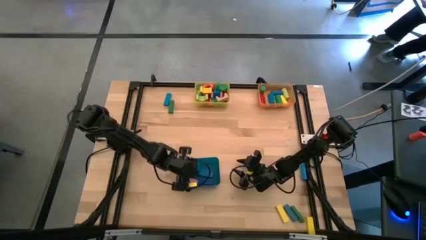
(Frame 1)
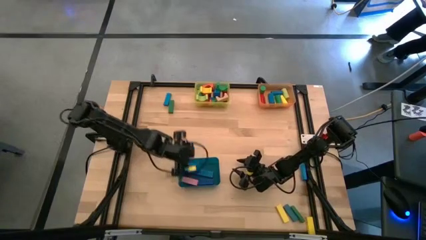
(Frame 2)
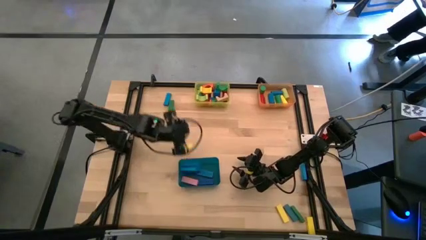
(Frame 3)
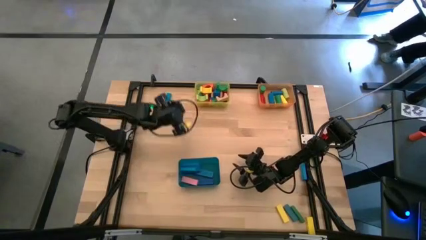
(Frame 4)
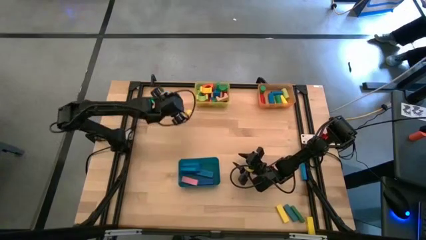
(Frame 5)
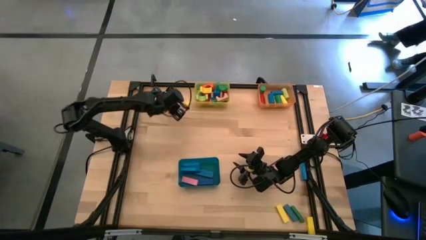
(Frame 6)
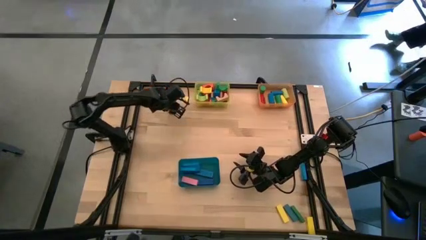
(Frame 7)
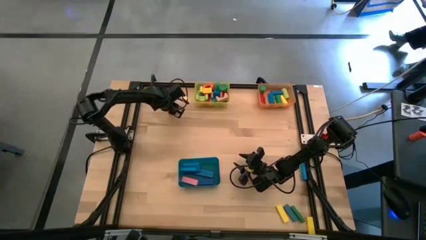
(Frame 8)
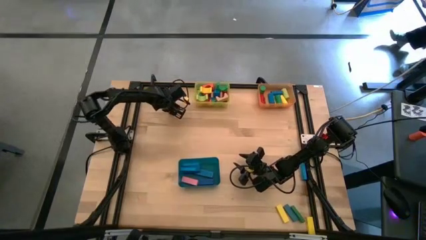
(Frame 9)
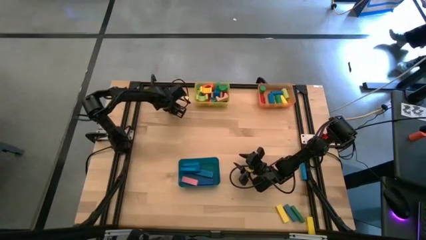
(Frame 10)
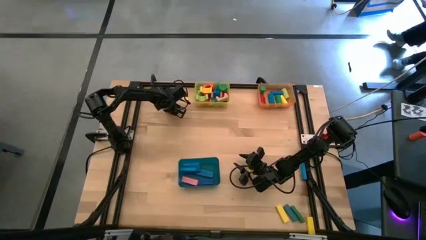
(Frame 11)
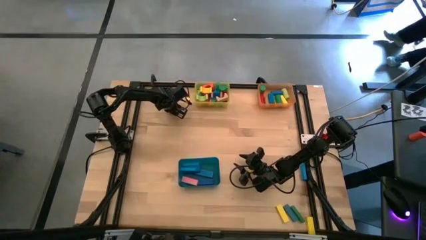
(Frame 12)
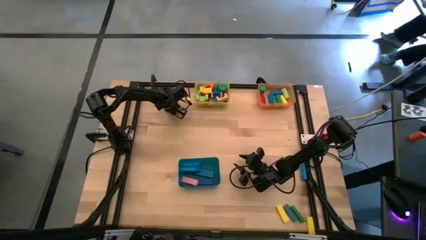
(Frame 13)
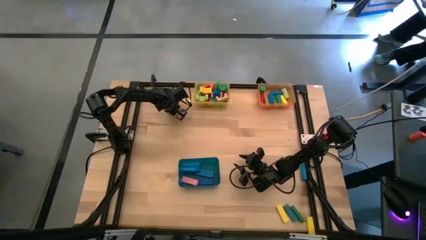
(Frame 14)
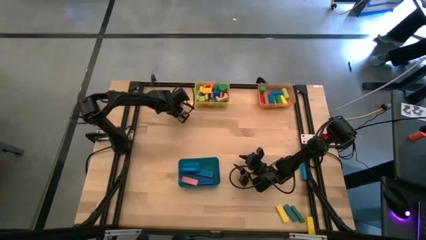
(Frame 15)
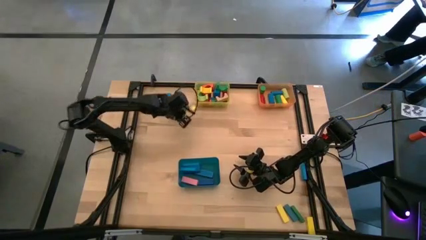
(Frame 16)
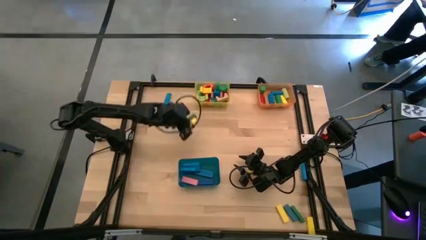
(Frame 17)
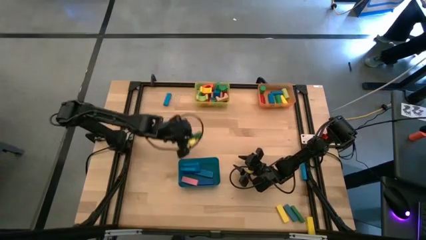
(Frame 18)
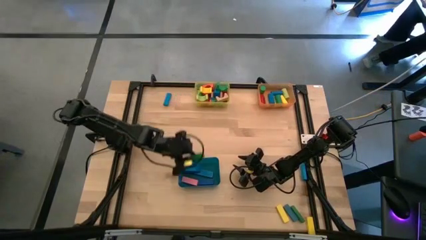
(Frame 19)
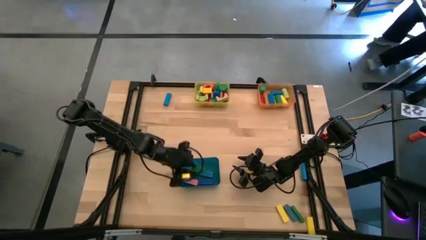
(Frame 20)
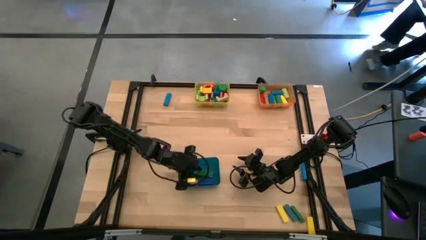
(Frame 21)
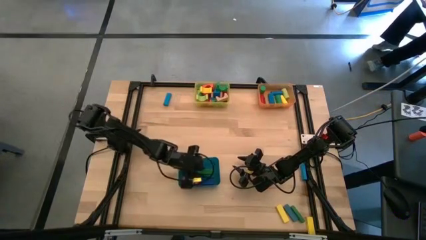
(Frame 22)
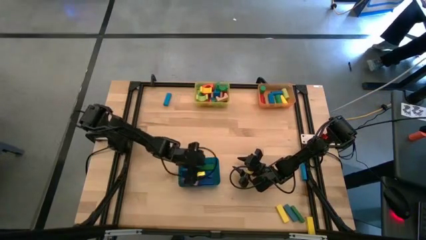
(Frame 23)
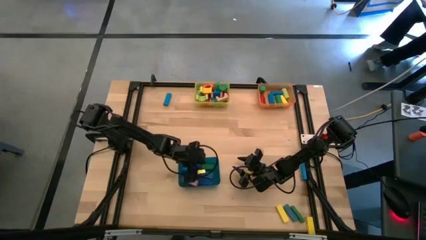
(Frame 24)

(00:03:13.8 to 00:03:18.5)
Task: Sort blocks by size
Put the green rectangular block into the blue bin

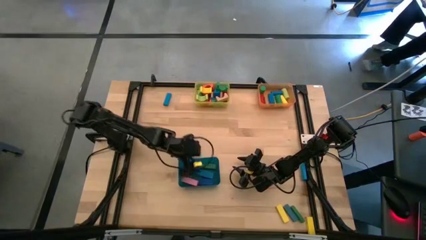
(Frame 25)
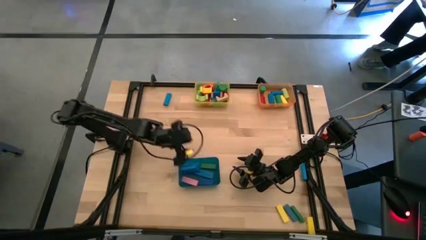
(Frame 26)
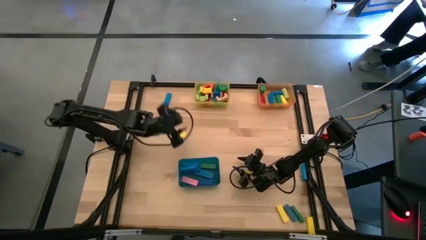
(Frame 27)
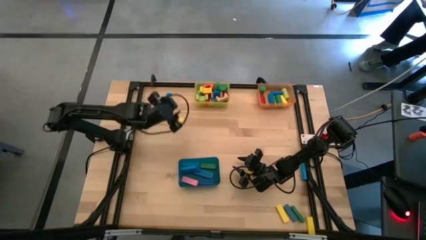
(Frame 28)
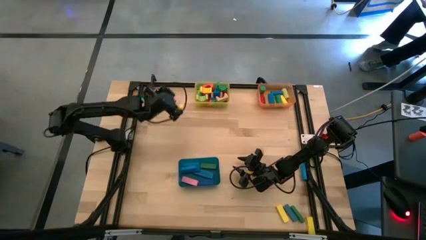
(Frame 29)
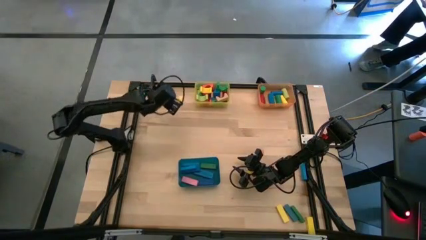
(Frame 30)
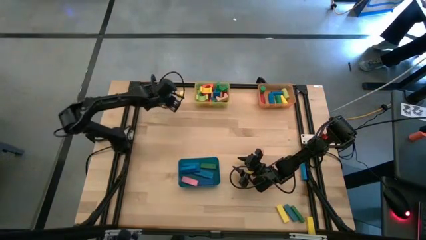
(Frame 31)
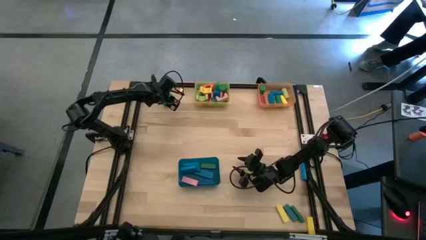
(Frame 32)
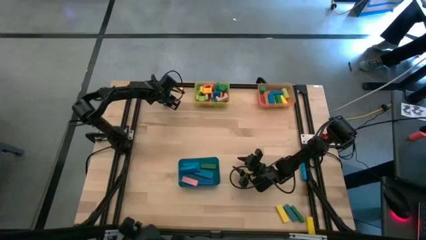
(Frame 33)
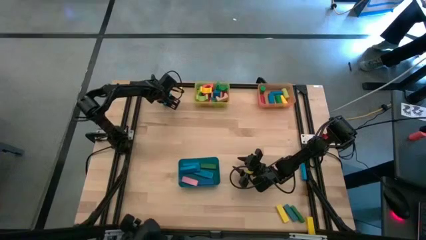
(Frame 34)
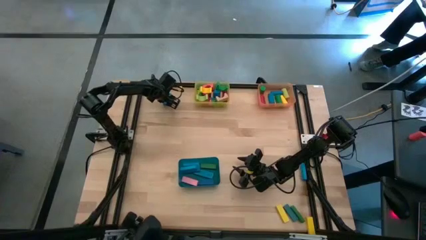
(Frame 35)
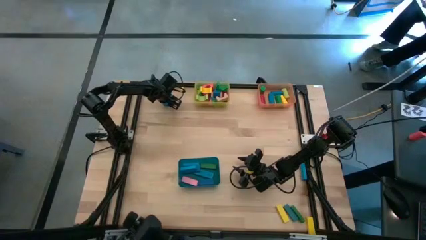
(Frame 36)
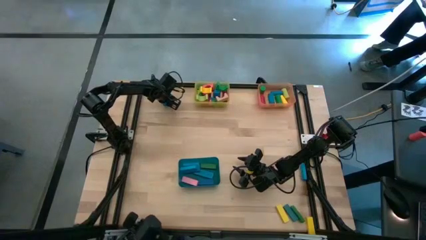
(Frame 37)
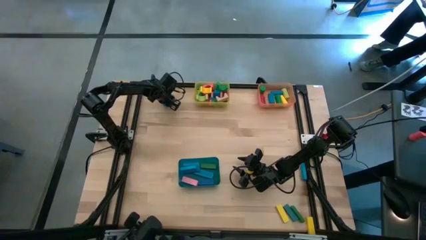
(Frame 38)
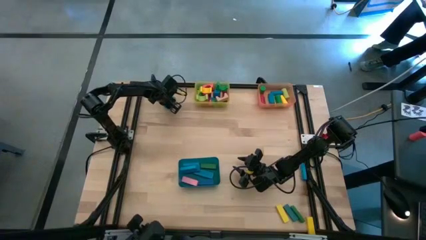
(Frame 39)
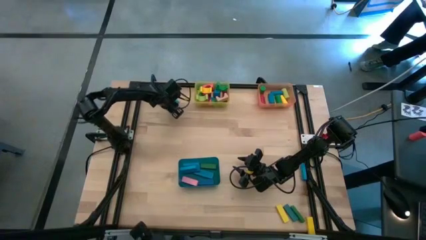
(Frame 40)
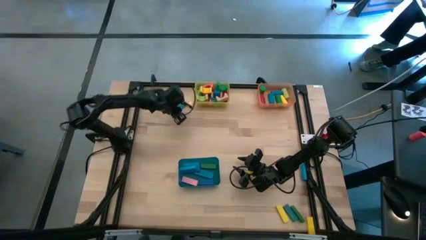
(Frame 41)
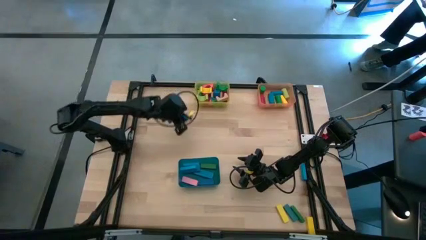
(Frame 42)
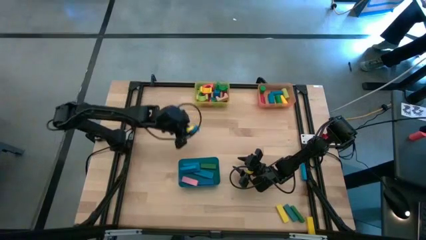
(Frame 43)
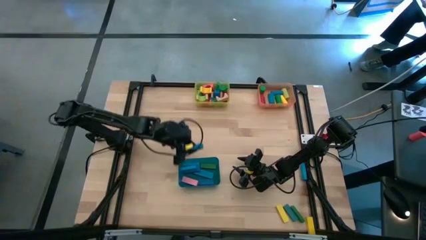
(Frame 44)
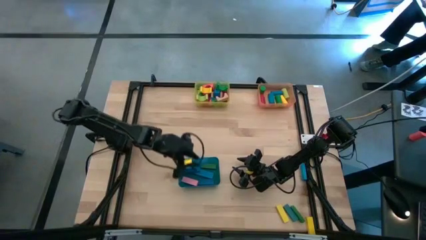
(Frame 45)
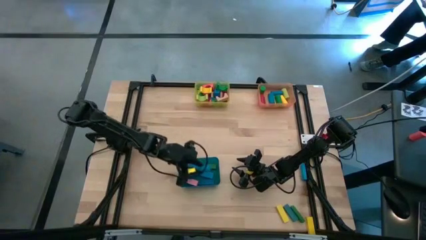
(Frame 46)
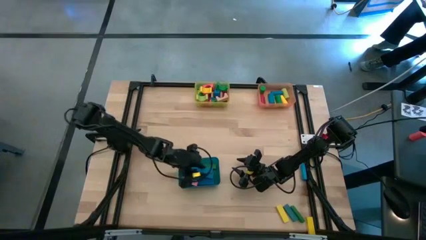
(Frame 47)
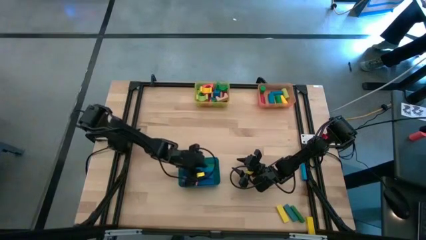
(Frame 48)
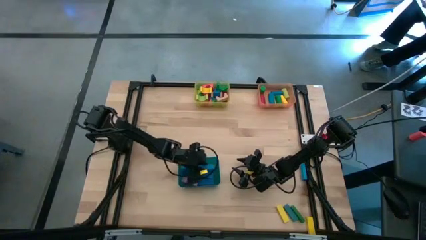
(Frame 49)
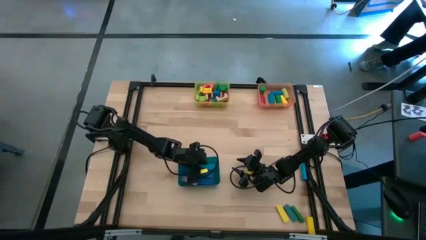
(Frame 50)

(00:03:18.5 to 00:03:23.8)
Put the blue rectangular block into the blue bin

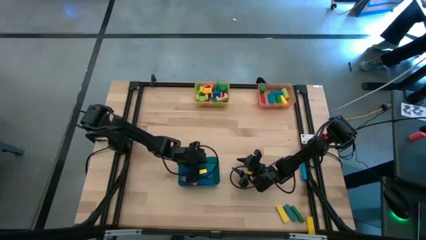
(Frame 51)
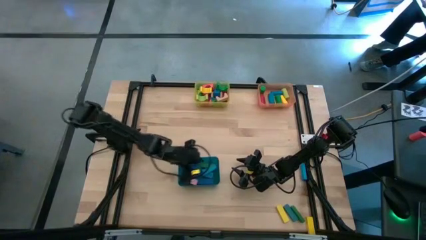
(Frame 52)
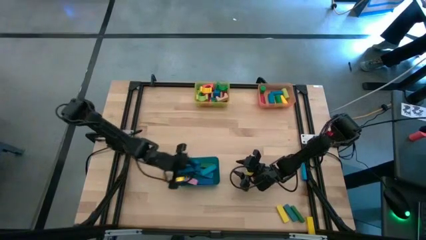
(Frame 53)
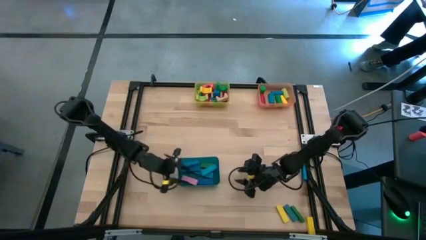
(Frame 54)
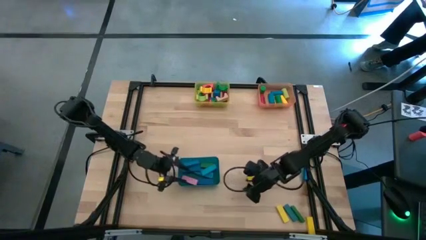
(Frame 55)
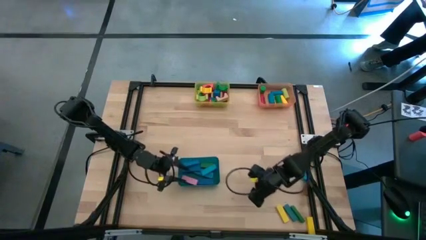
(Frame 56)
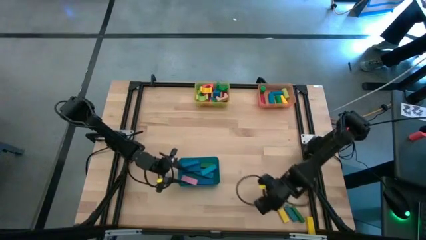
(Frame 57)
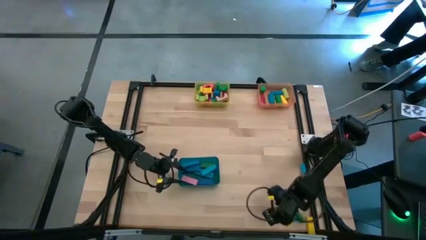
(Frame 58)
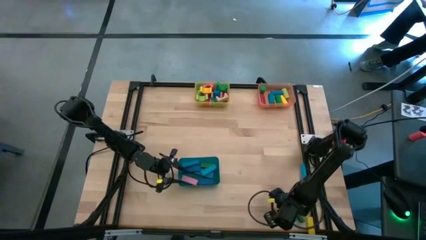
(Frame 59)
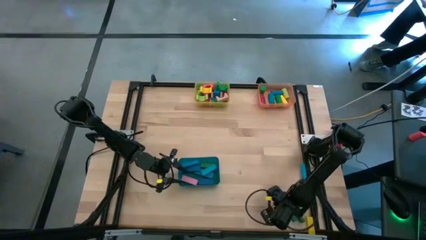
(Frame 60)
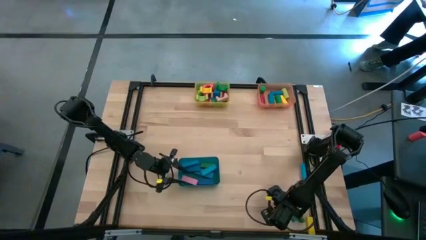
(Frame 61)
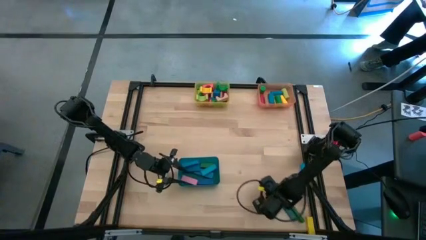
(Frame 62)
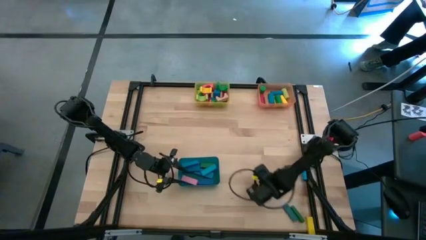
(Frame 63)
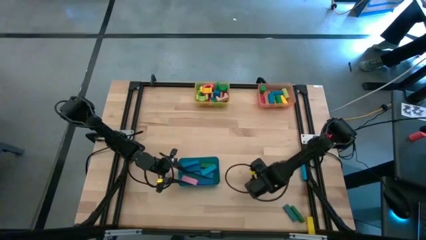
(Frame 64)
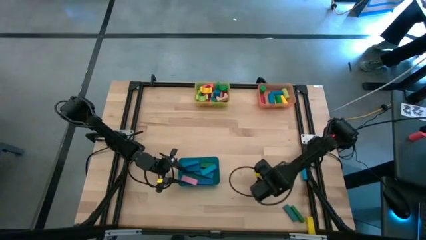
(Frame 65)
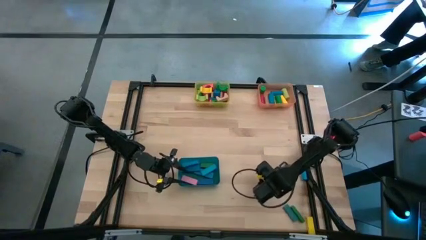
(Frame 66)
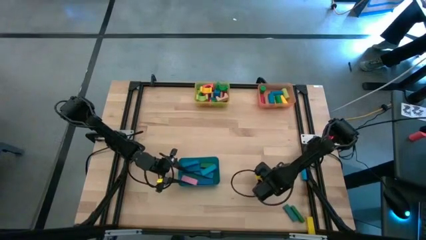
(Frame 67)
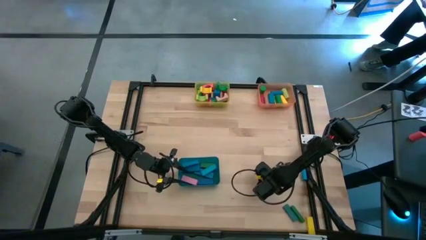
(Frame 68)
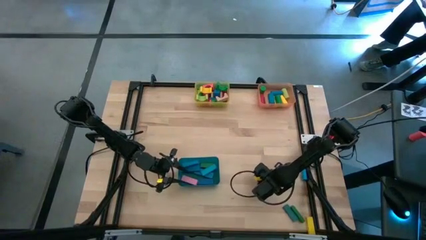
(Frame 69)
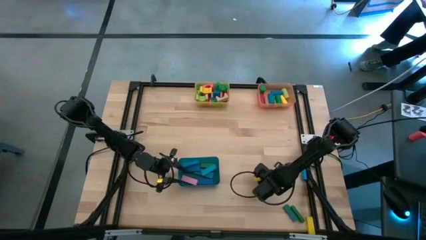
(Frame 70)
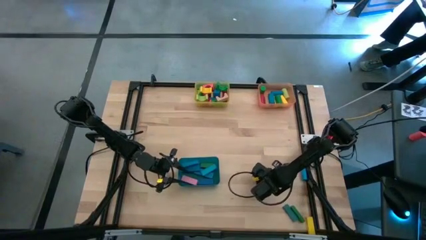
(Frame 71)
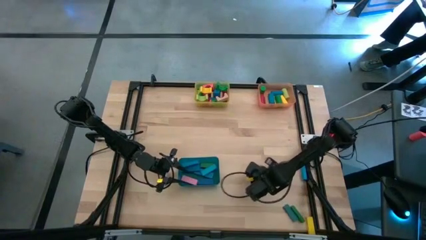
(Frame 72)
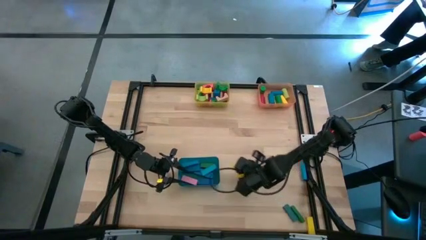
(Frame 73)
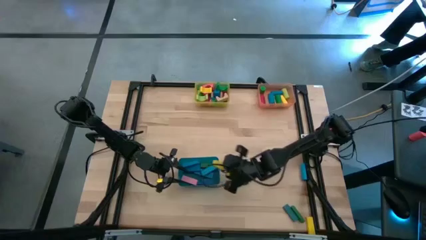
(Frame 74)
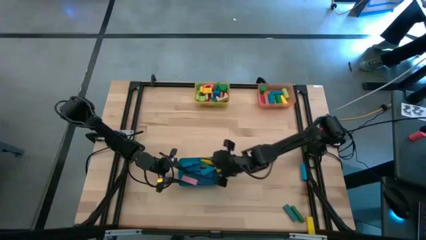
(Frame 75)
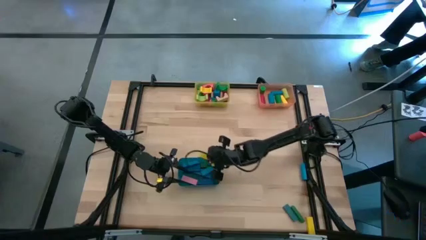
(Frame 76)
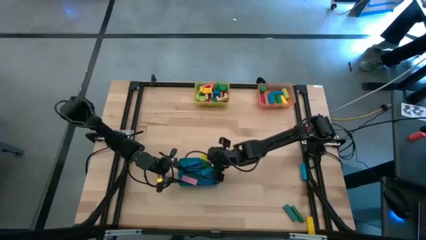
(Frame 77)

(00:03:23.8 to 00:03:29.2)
Put the yellow rectangular block into the blue bin
